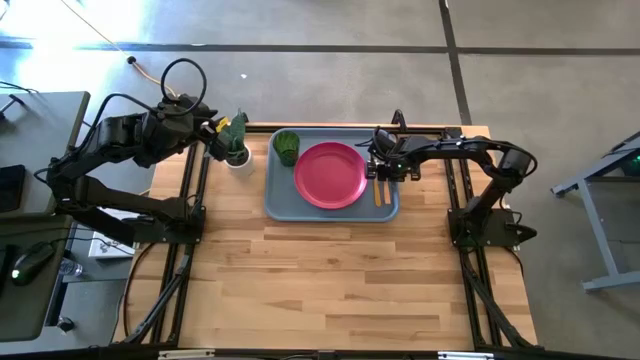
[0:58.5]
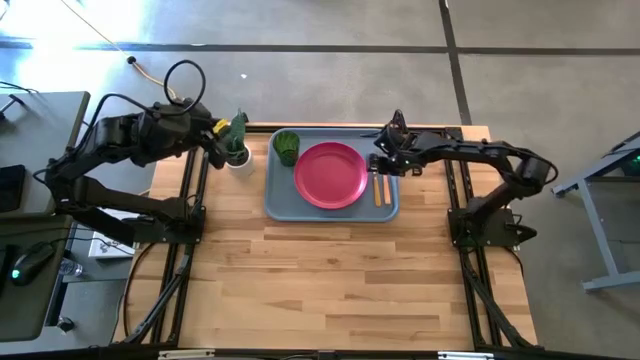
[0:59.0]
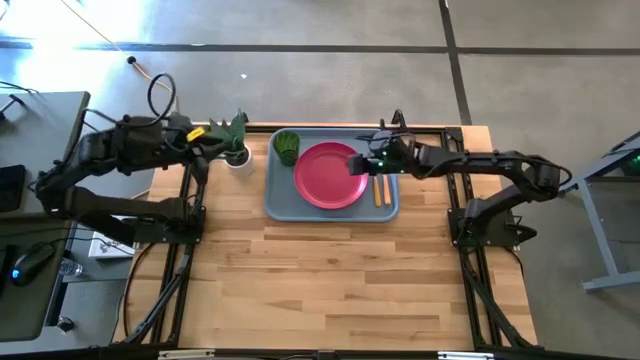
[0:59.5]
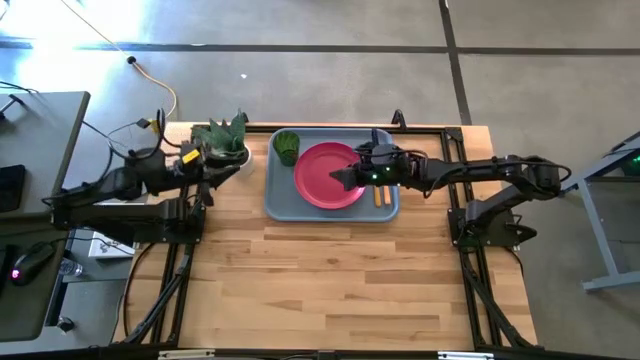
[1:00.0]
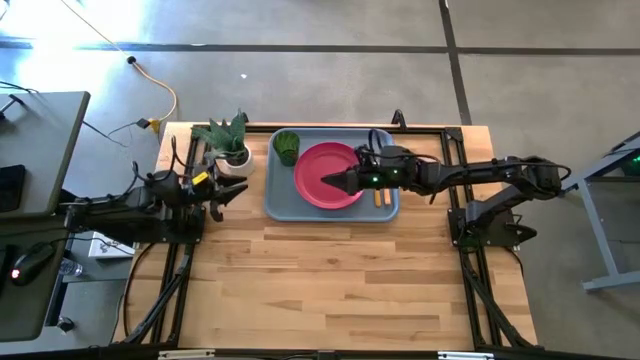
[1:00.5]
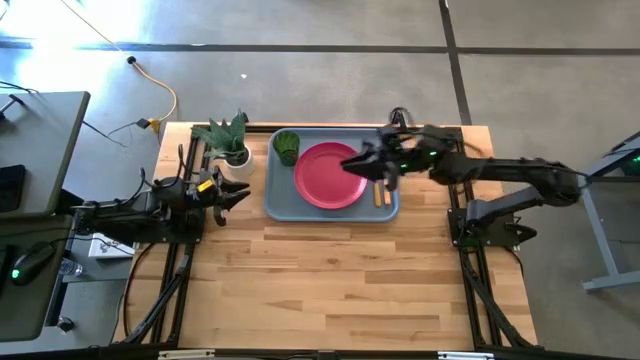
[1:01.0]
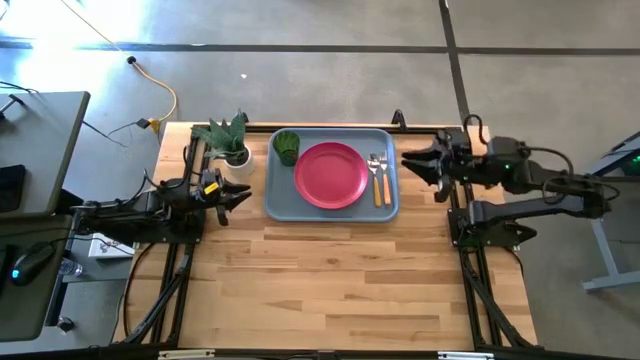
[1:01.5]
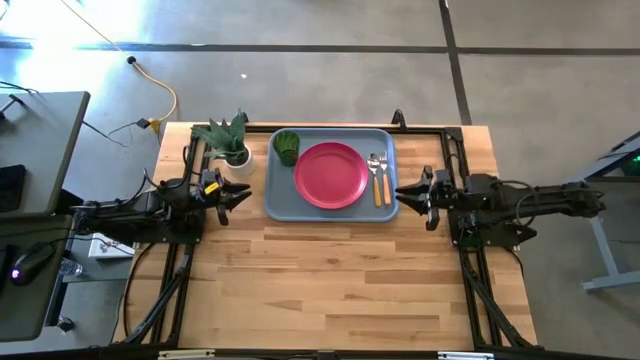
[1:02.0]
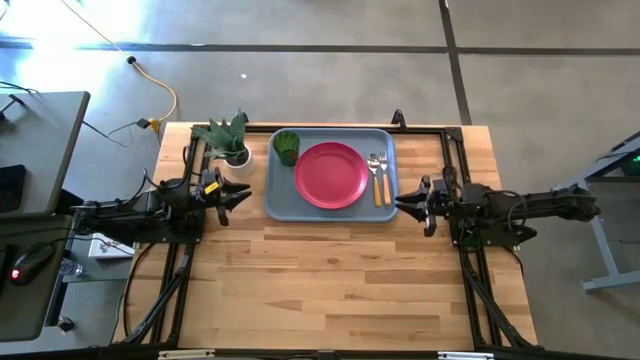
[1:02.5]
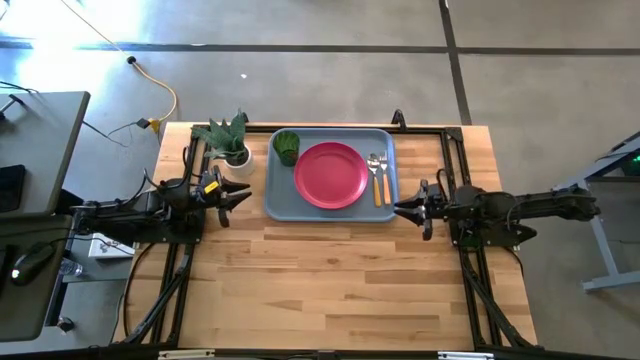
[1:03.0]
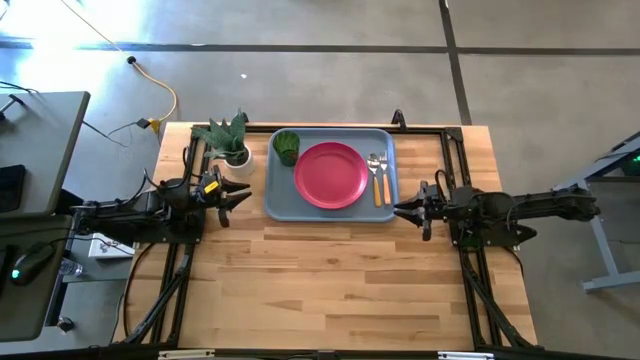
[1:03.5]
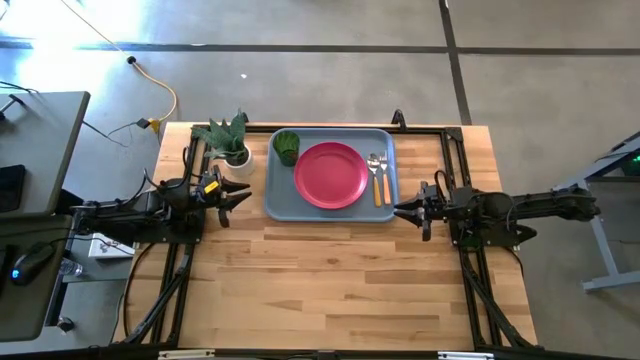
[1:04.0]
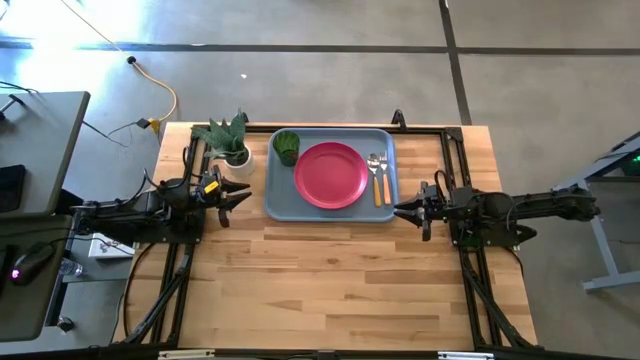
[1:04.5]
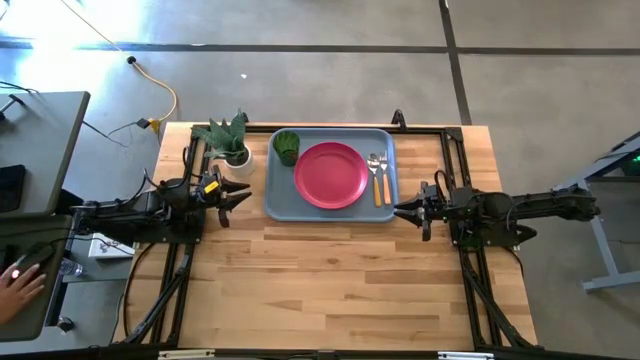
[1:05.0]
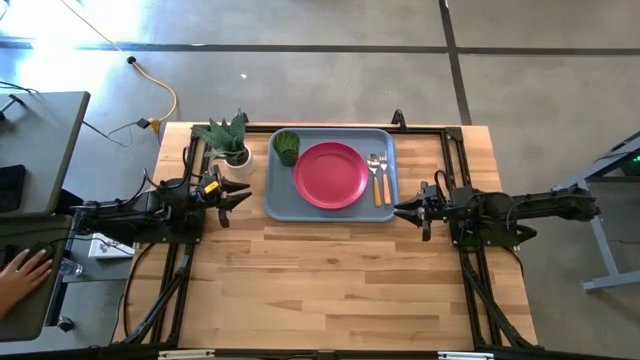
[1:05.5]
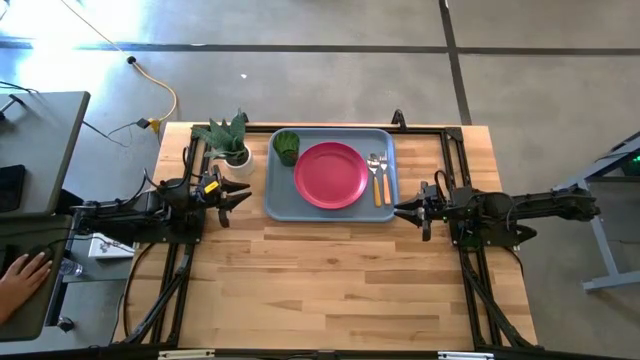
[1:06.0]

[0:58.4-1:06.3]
Task: Pick and place plate/cup/fork/spoon on tray
Return to Home Position

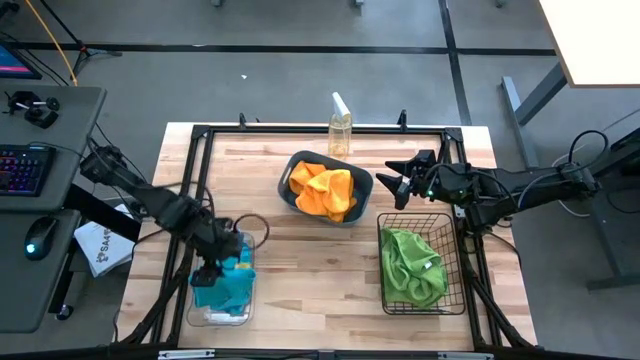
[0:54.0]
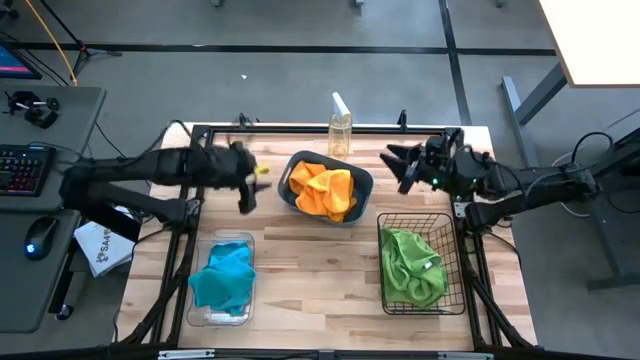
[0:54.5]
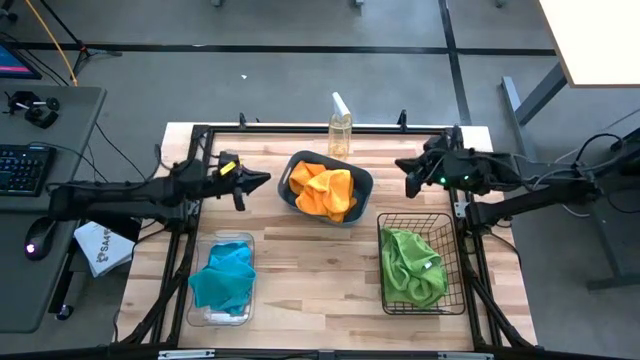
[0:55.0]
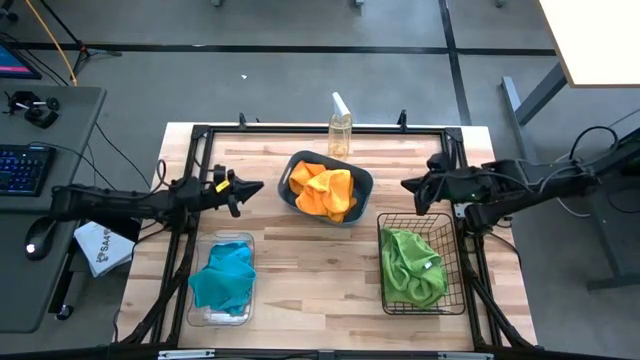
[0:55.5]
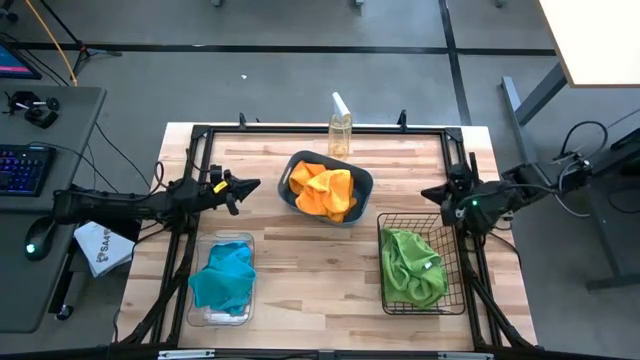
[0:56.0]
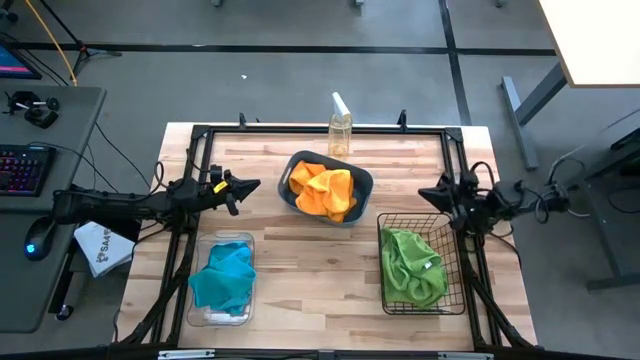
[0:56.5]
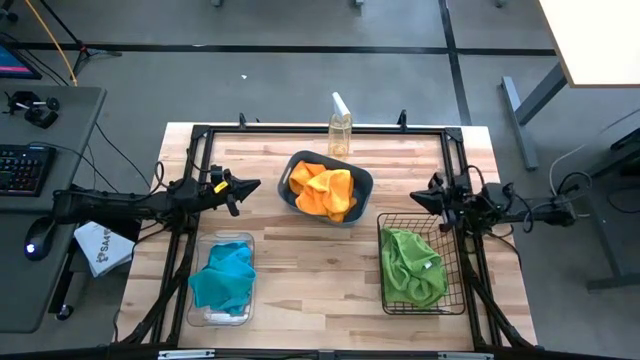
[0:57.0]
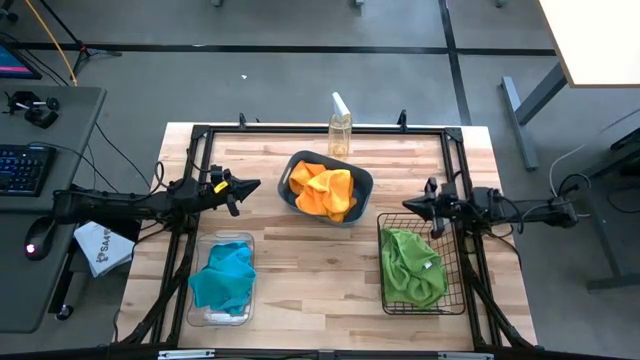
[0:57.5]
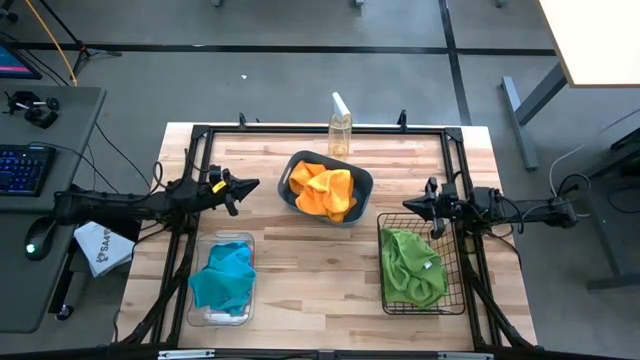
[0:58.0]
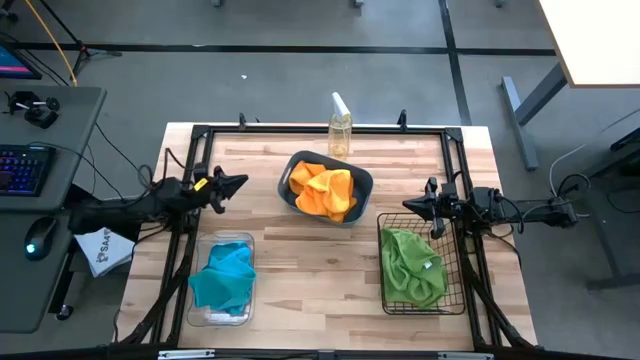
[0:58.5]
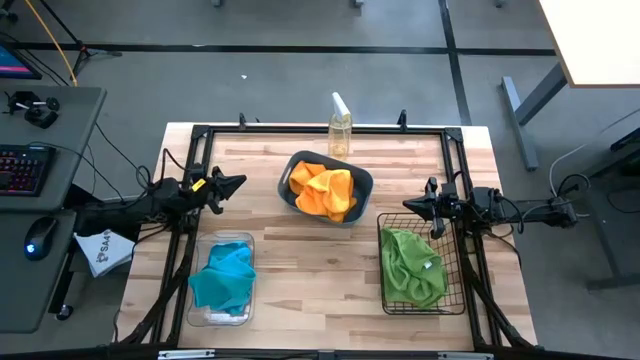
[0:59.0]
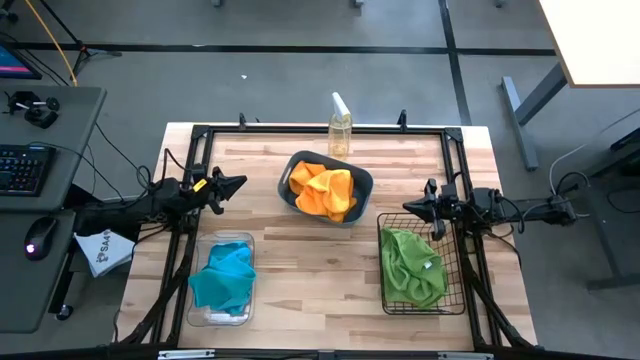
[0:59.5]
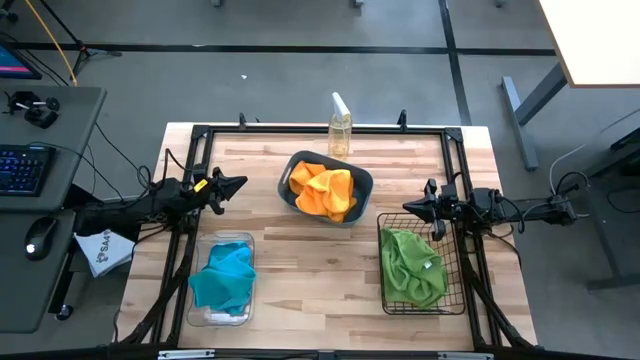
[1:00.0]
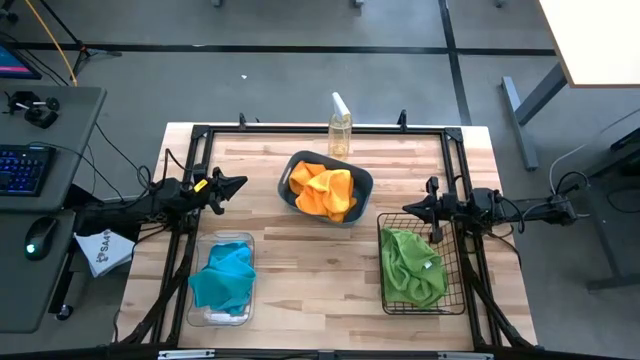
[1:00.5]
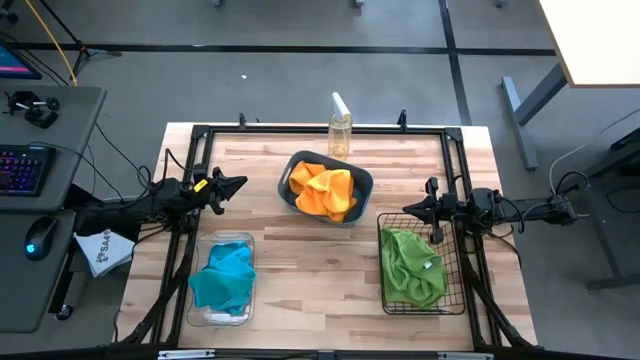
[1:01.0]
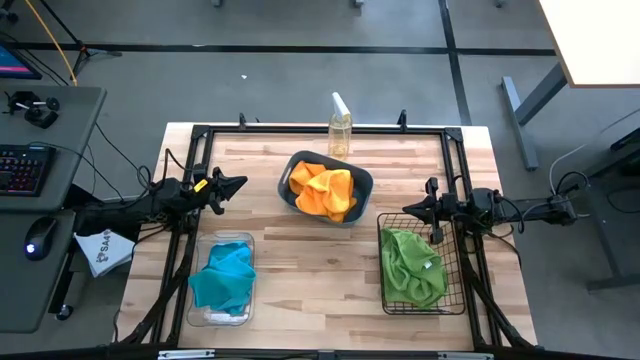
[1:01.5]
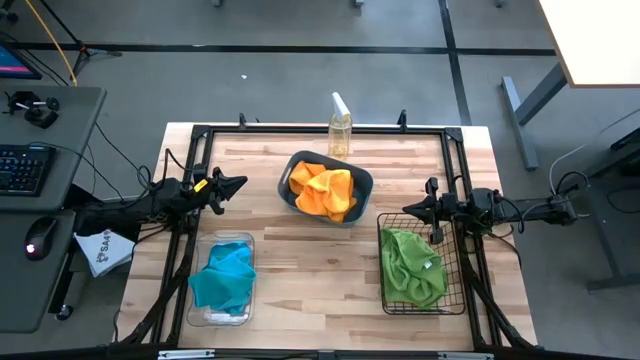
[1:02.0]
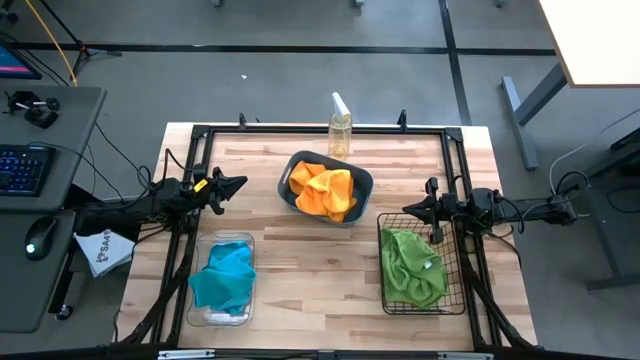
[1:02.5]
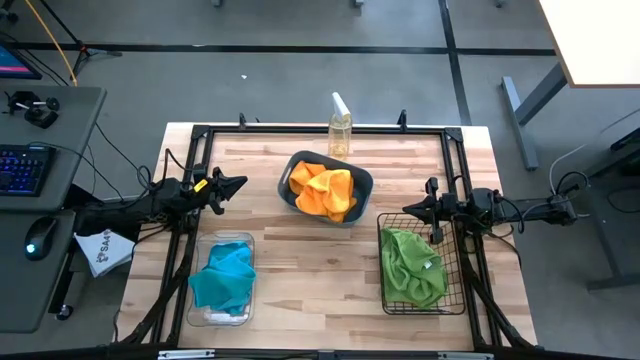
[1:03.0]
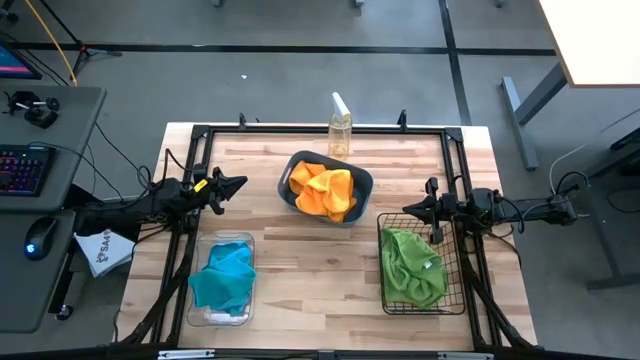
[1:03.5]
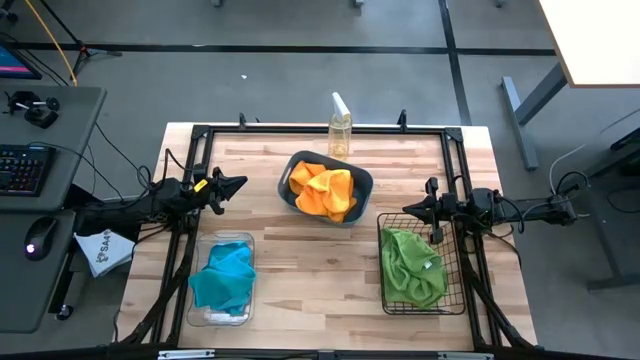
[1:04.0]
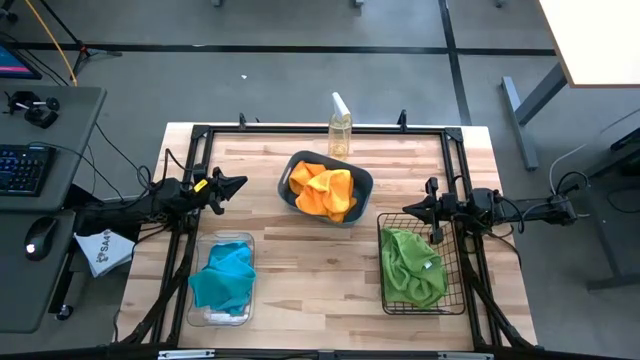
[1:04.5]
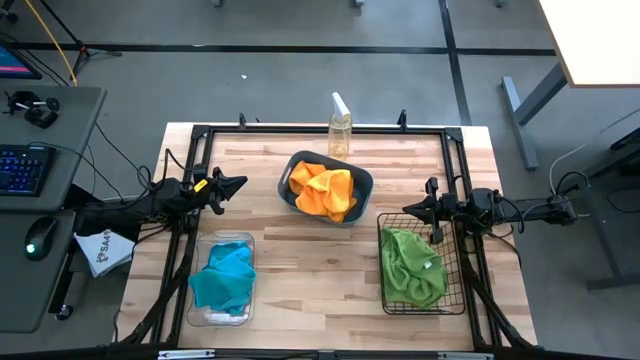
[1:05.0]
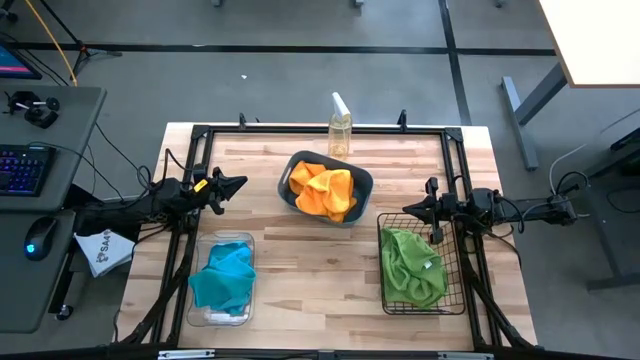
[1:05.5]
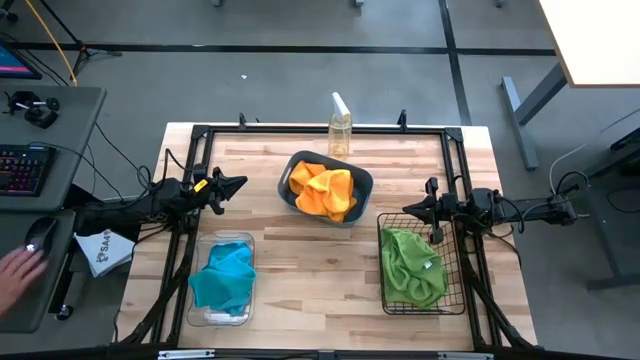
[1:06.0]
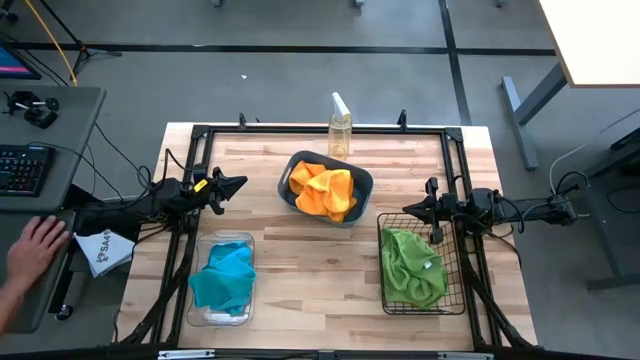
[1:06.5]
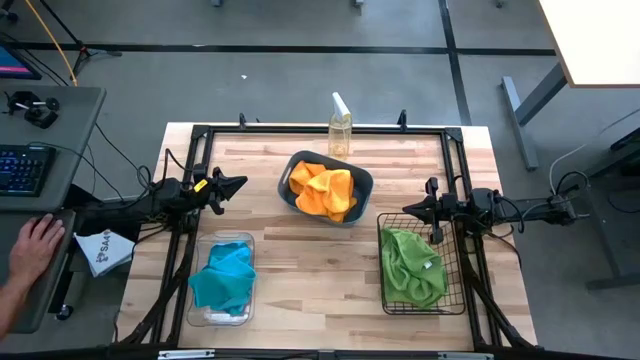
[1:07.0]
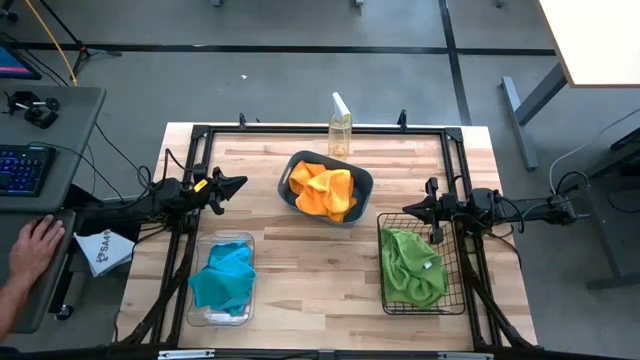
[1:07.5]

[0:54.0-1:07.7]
Task: Sort microfiber towel by color & place in baskets
Return to Home Position
